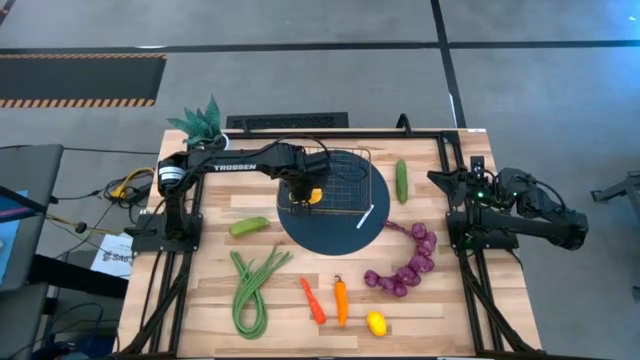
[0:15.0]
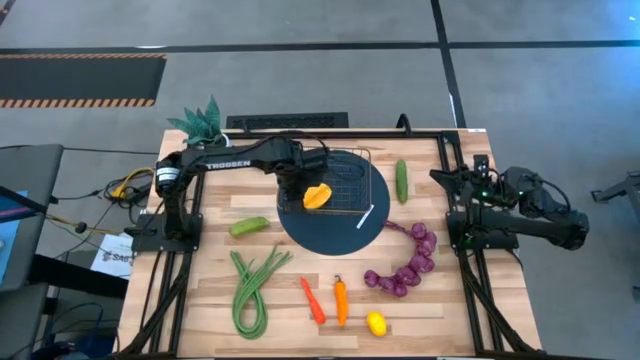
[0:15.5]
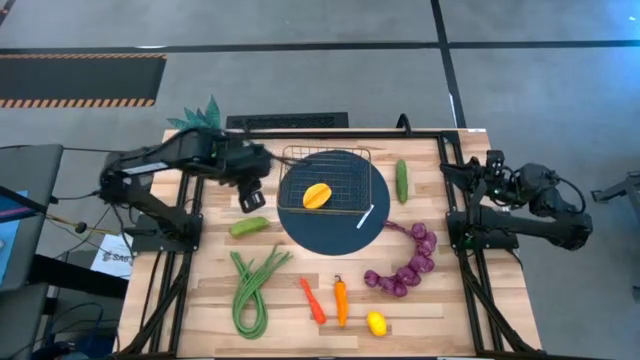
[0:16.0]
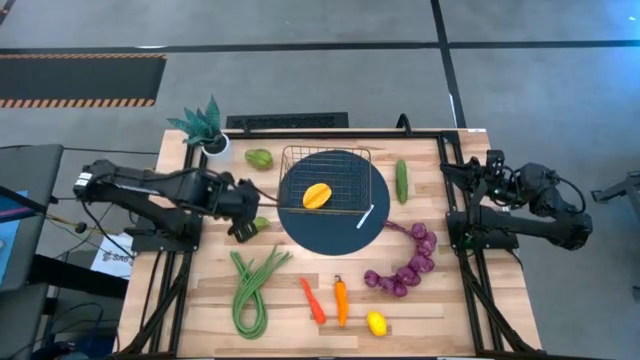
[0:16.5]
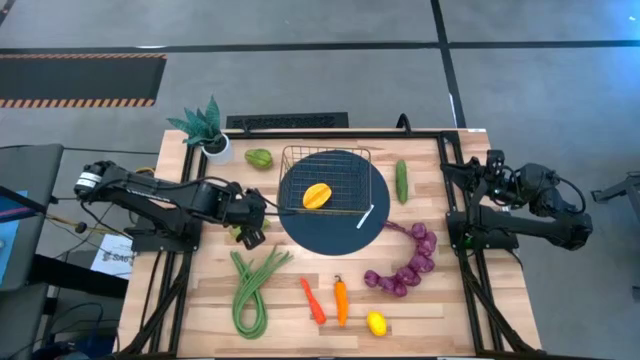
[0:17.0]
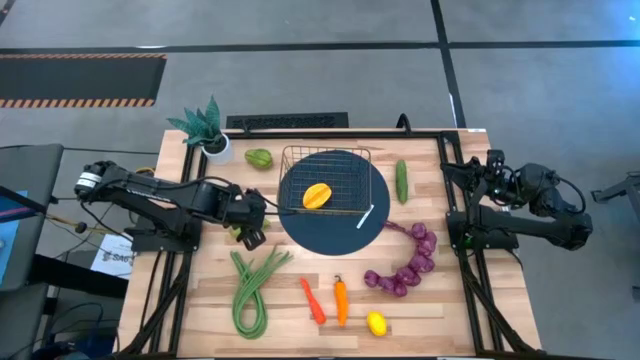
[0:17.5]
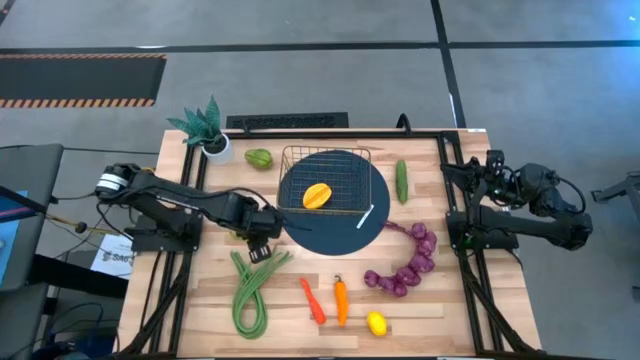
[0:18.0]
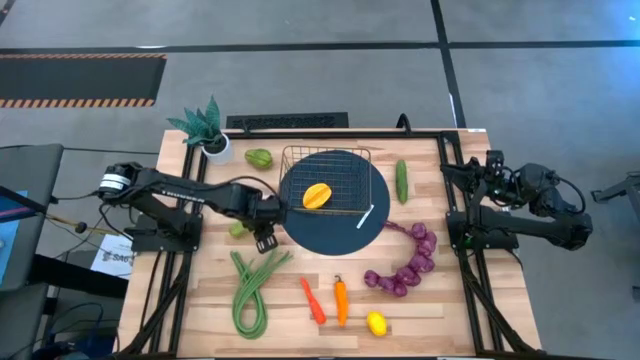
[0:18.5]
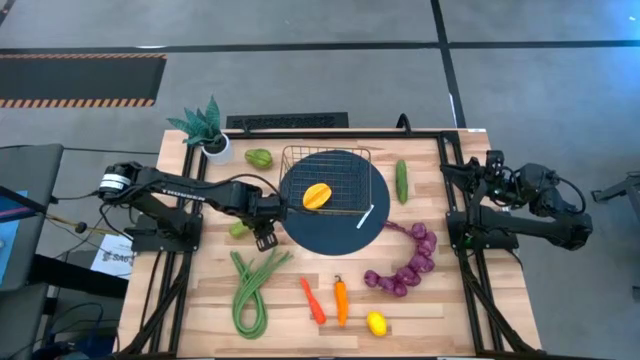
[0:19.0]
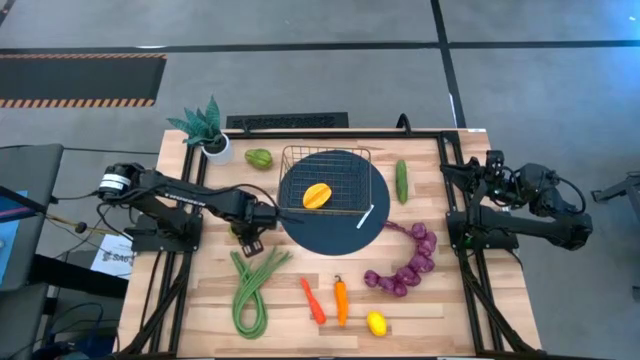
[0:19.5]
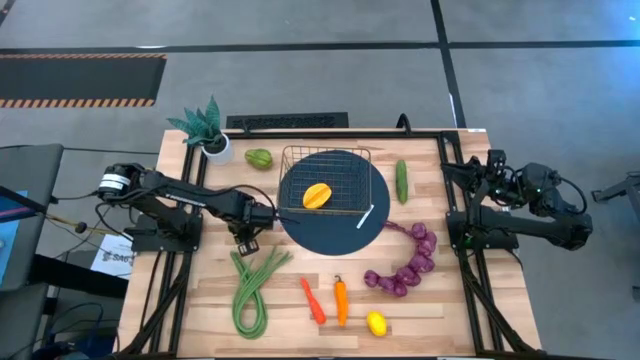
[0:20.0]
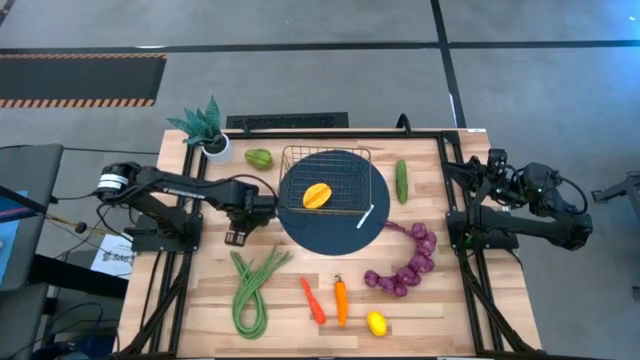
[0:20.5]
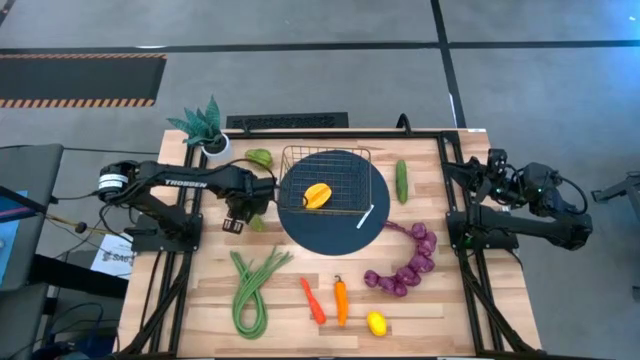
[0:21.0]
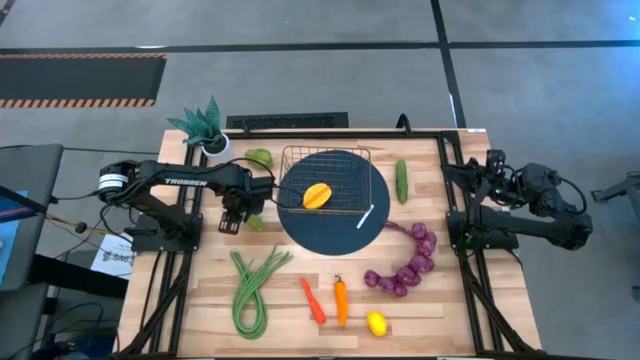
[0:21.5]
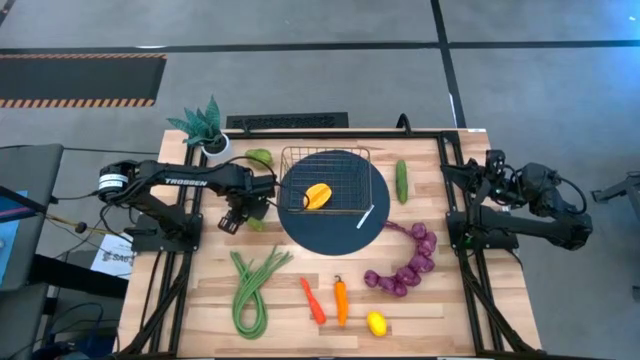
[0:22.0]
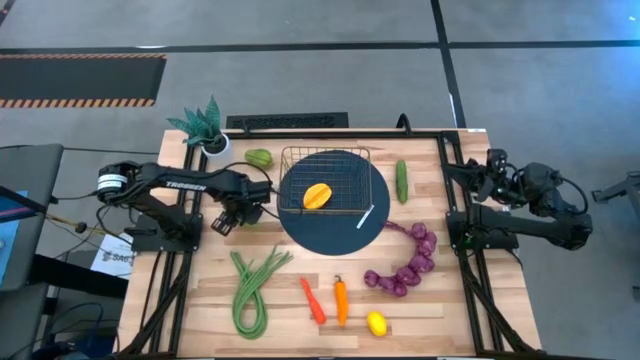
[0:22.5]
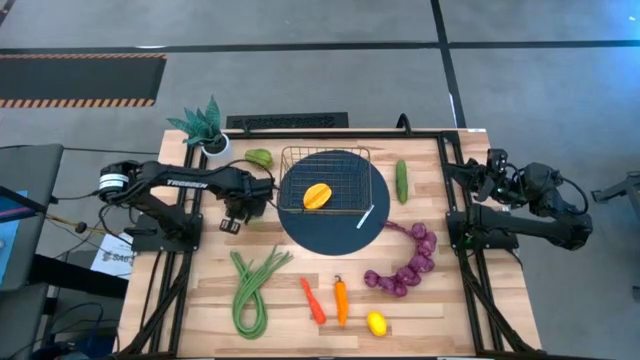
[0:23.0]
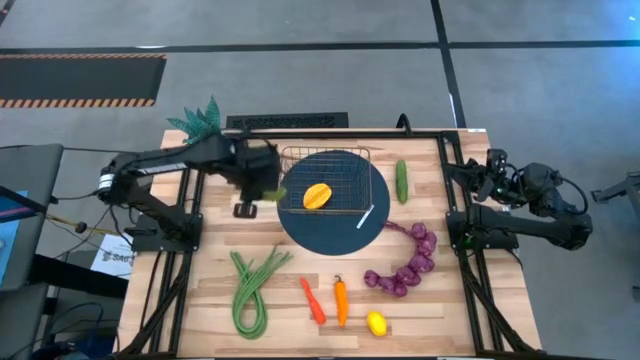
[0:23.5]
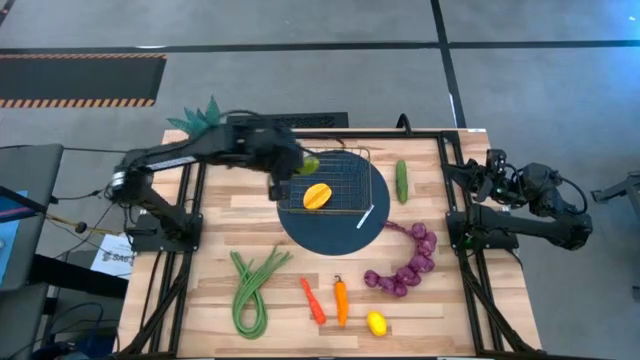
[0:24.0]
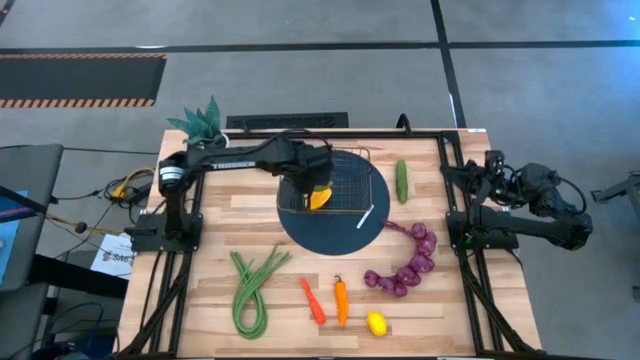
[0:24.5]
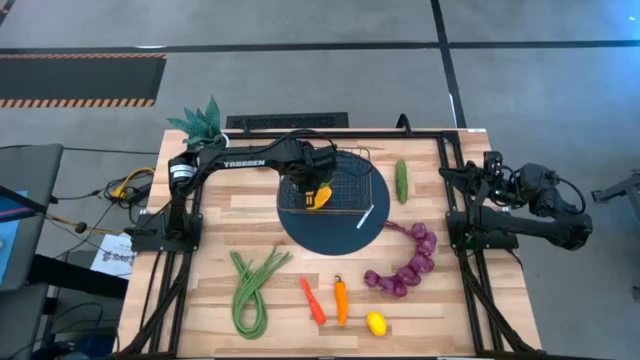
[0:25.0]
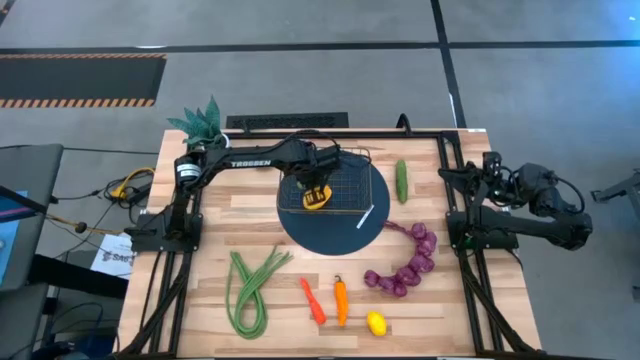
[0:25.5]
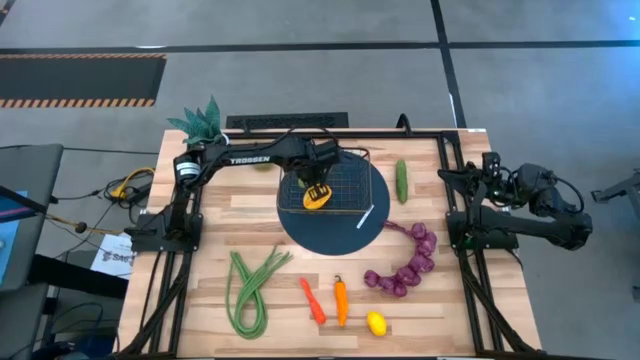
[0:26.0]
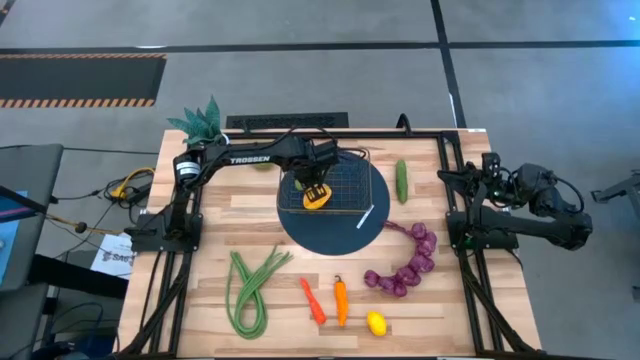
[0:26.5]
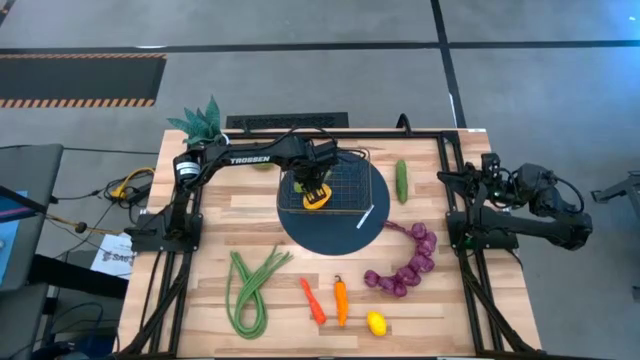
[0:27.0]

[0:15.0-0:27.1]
Task: Build produce basket
Put the left green cucumber into the wire basket

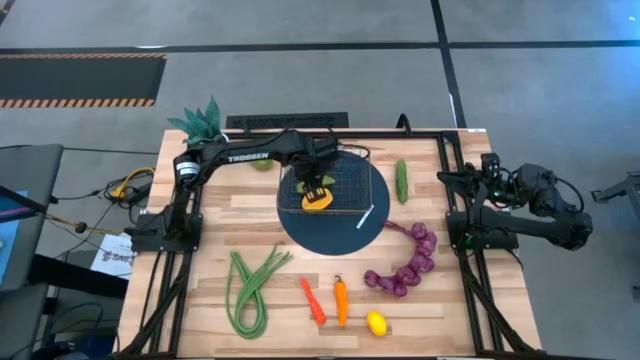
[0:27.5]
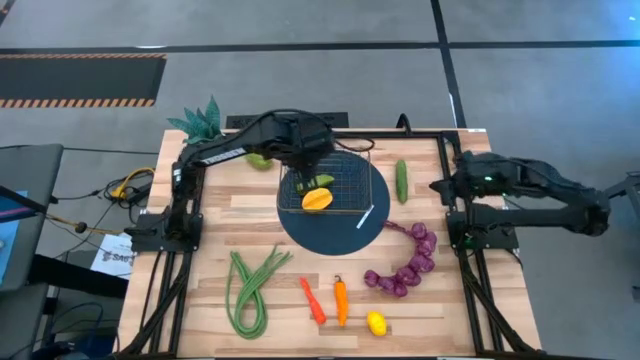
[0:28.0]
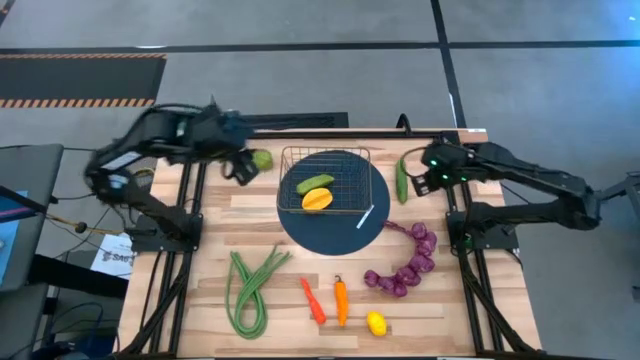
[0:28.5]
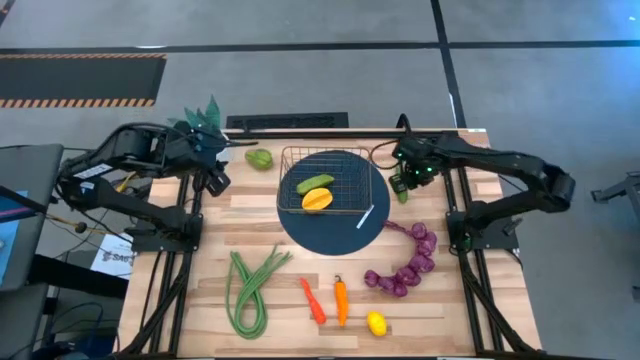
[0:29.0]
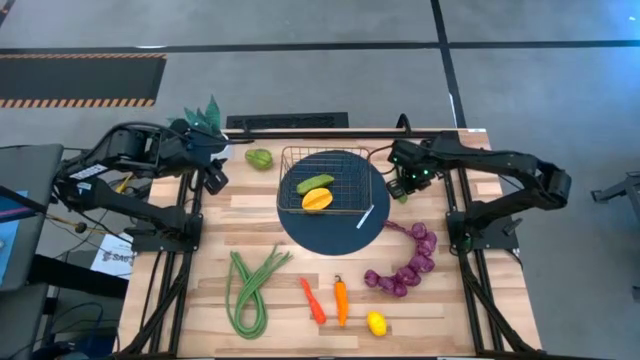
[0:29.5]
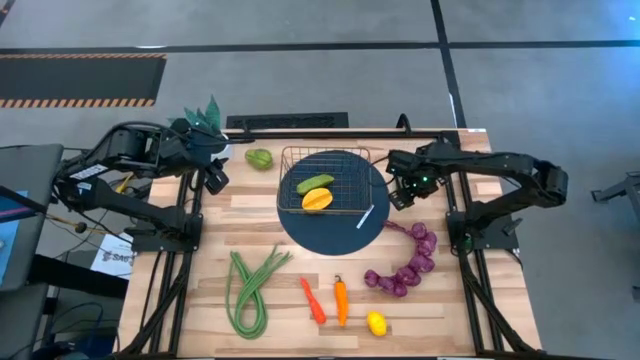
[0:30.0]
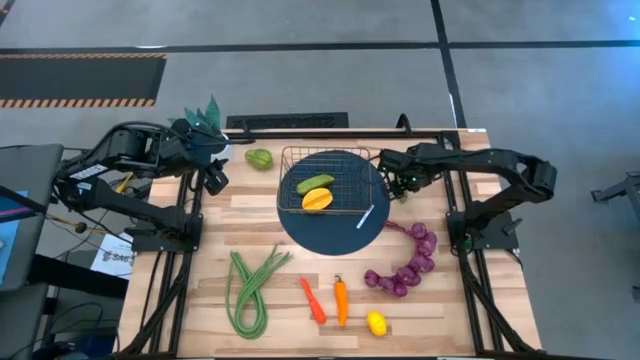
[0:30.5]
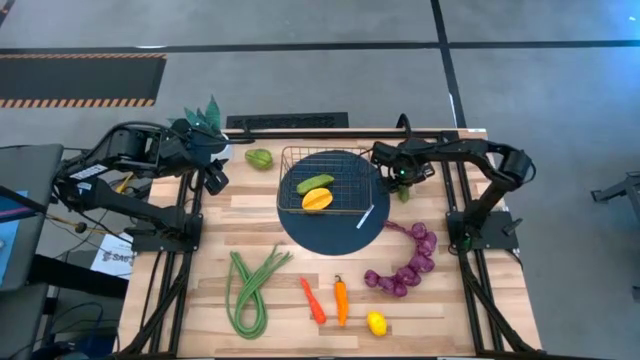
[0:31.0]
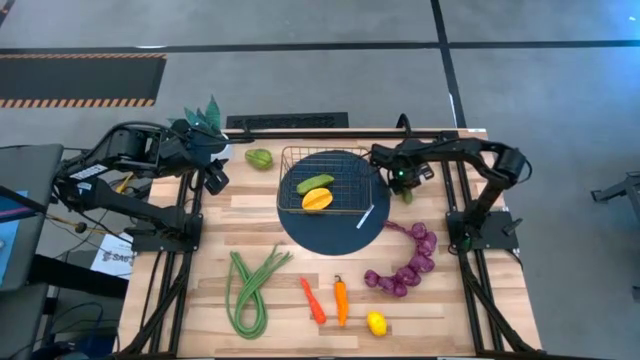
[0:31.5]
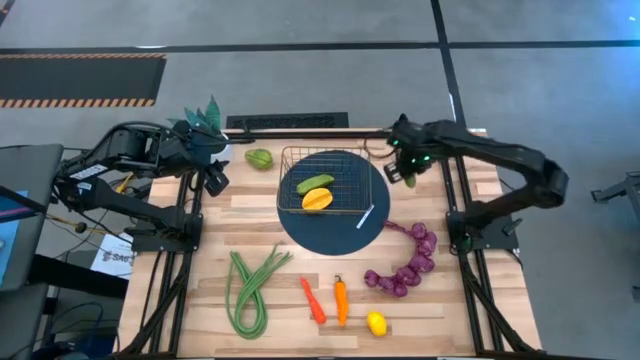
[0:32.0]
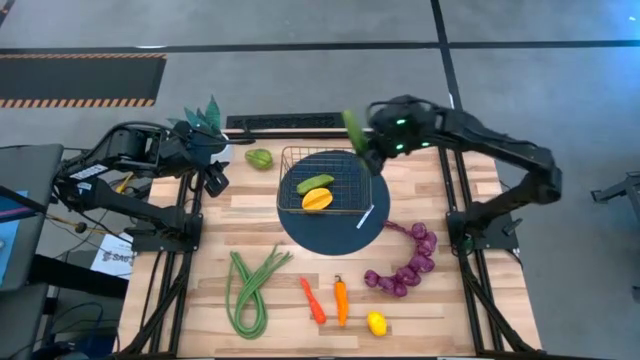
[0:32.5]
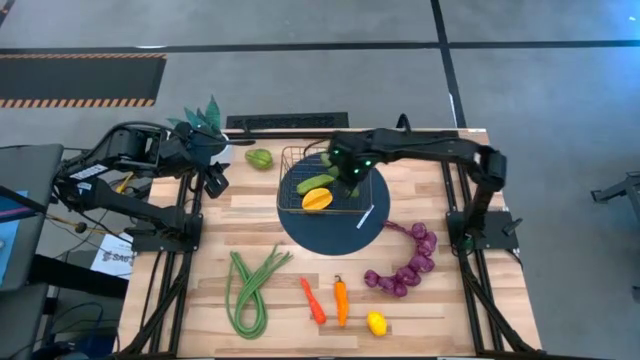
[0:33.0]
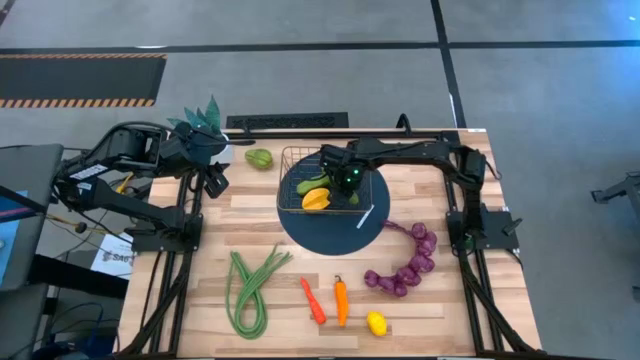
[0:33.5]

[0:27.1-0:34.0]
Put the green cucumber into the wire basket

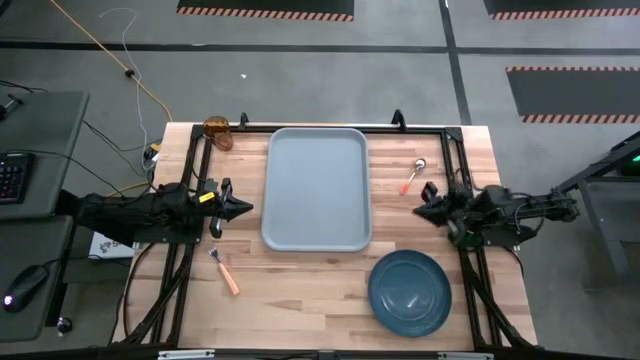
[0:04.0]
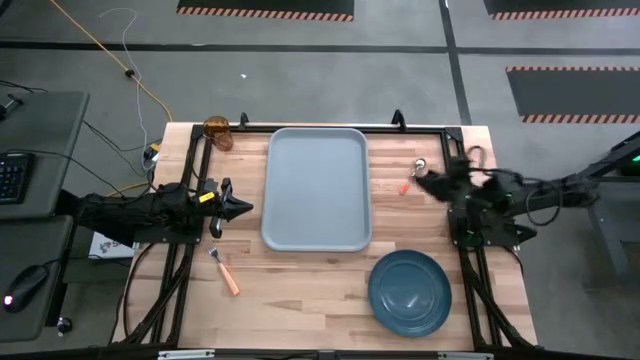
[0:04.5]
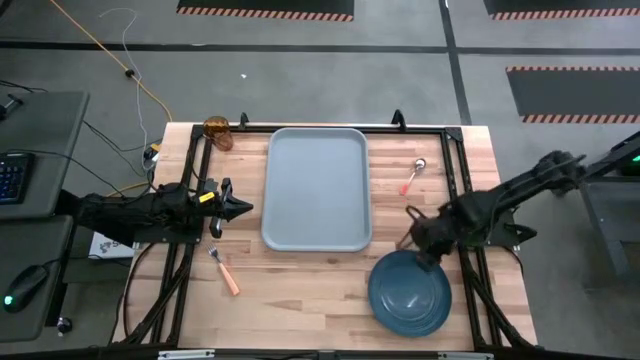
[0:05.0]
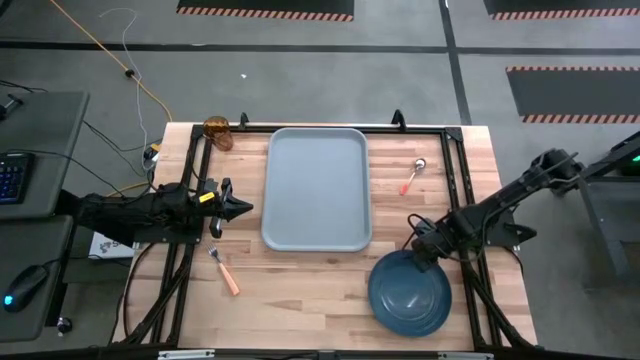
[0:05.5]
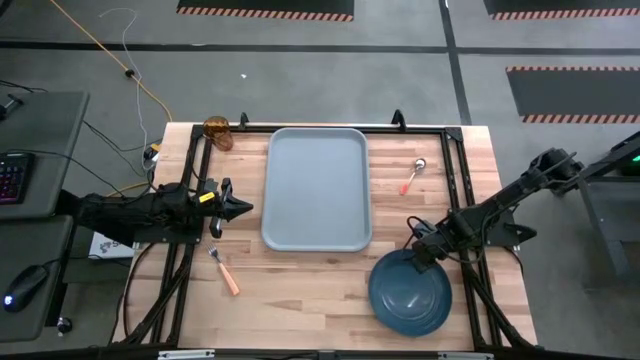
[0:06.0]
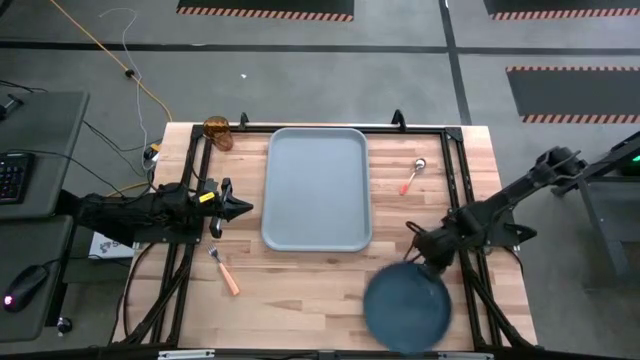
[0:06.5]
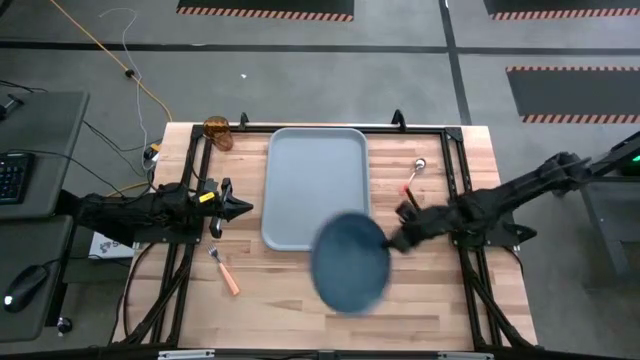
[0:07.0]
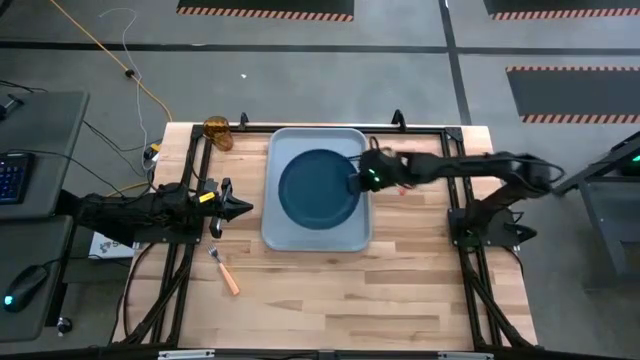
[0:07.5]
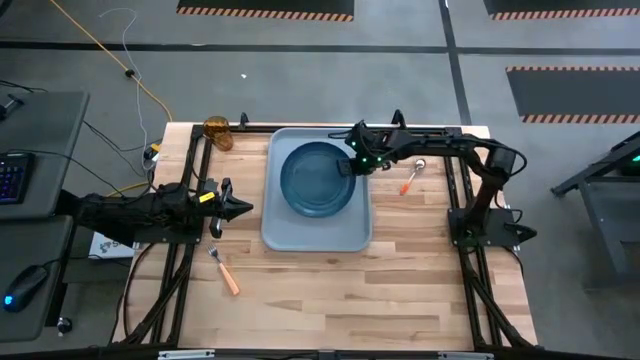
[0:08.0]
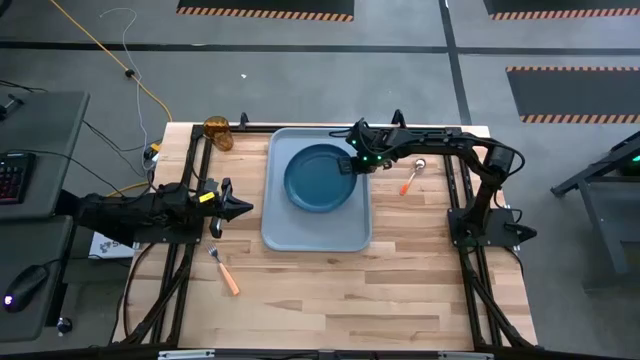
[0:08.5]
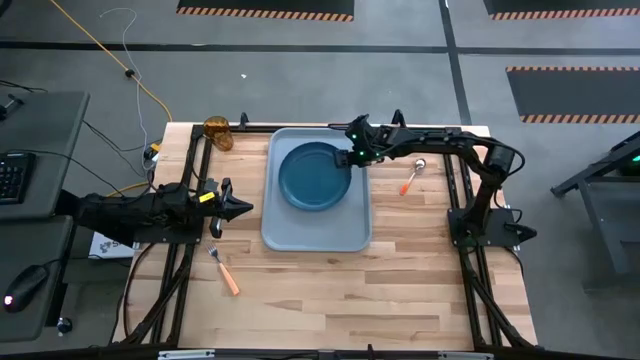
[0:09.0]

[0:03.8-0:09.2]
Task: Pick and place plate/cup/fork/spoon on tray
Put the dark blue plate on the light blue tray
